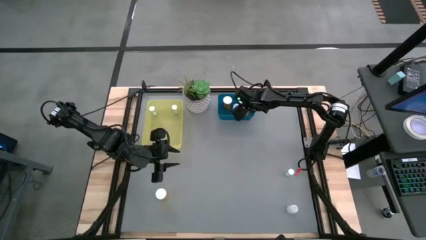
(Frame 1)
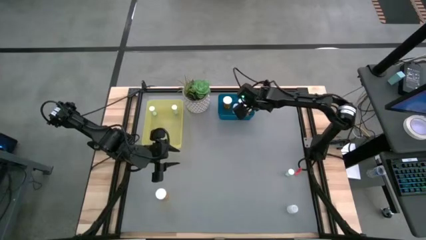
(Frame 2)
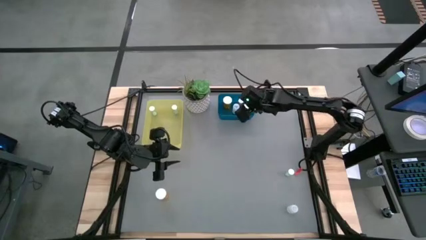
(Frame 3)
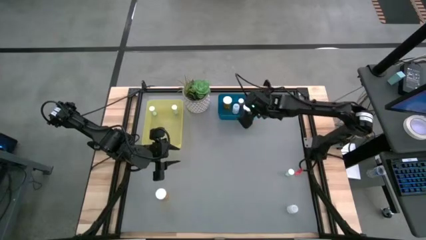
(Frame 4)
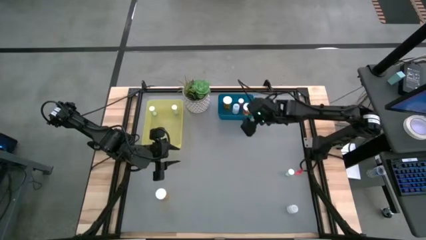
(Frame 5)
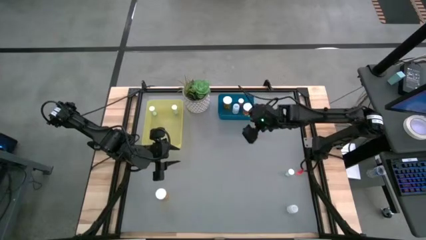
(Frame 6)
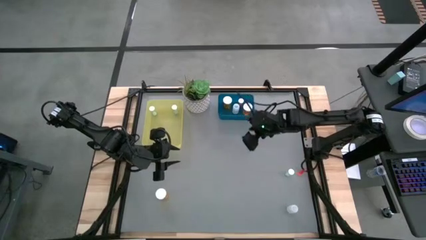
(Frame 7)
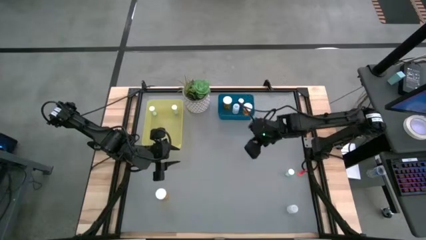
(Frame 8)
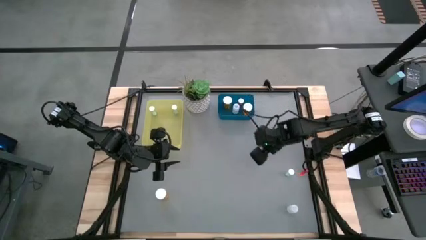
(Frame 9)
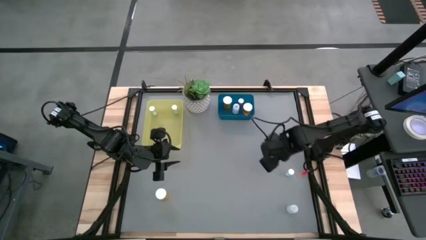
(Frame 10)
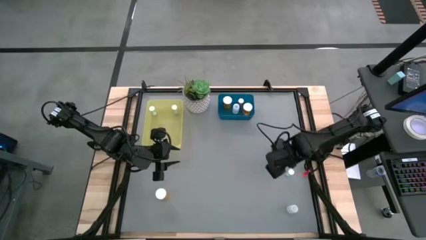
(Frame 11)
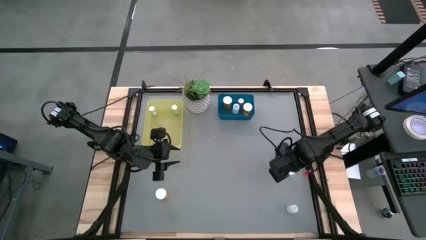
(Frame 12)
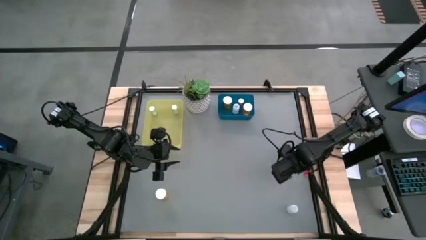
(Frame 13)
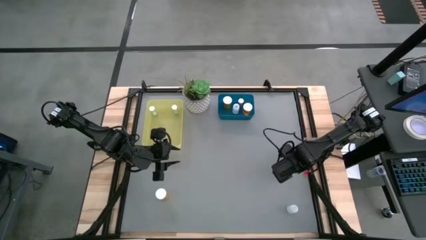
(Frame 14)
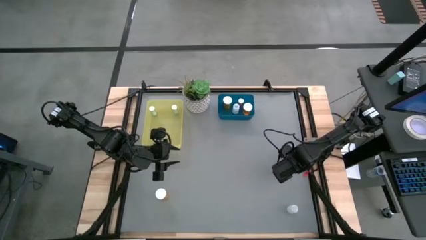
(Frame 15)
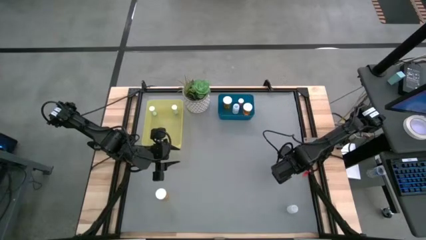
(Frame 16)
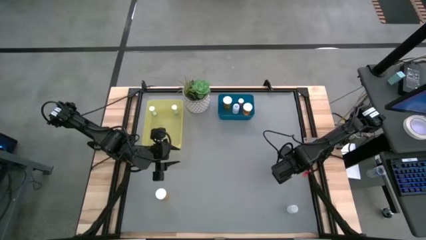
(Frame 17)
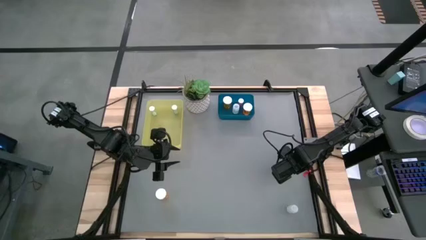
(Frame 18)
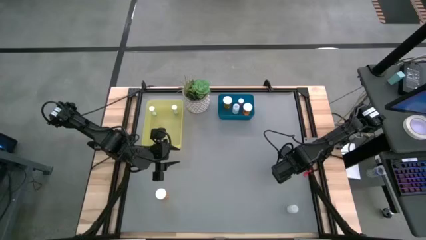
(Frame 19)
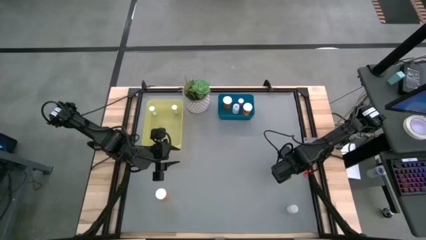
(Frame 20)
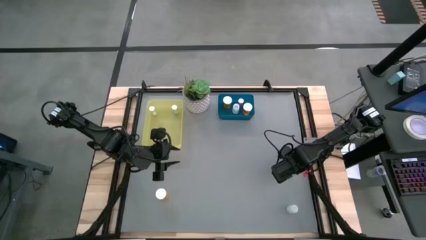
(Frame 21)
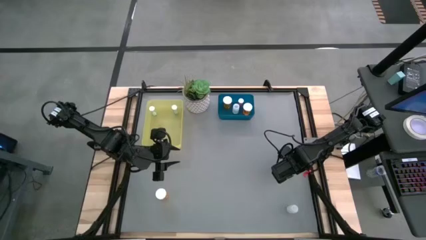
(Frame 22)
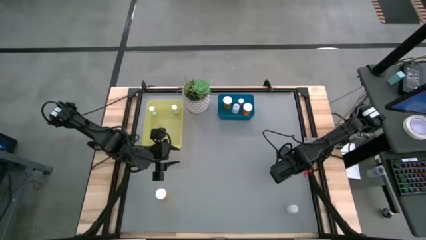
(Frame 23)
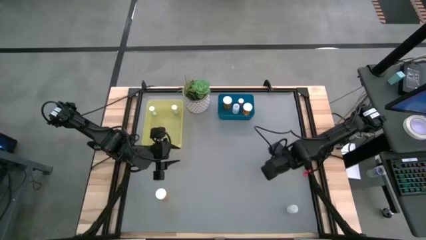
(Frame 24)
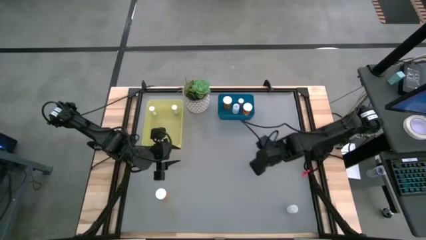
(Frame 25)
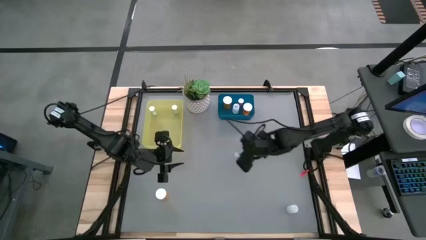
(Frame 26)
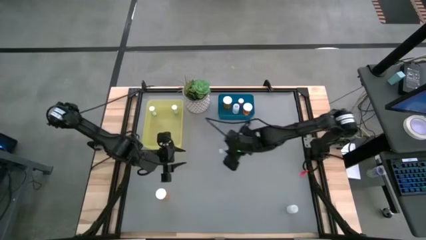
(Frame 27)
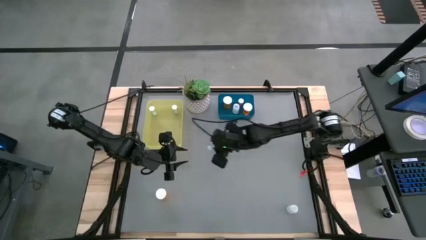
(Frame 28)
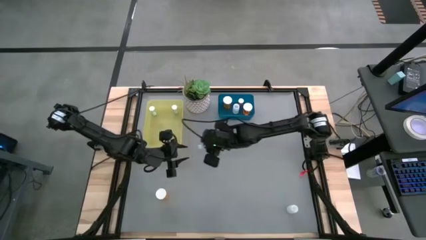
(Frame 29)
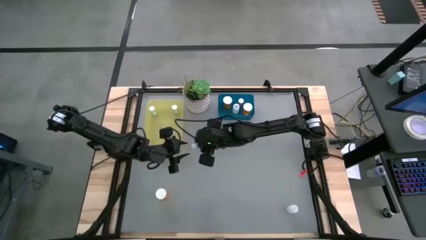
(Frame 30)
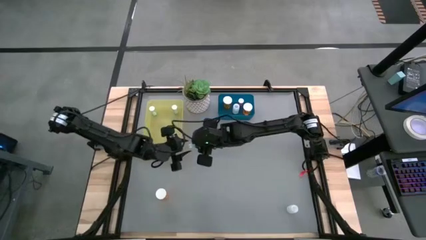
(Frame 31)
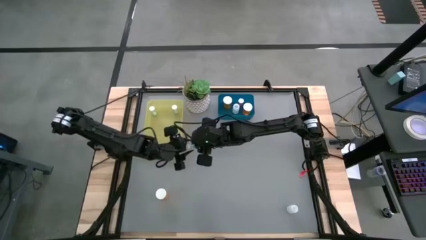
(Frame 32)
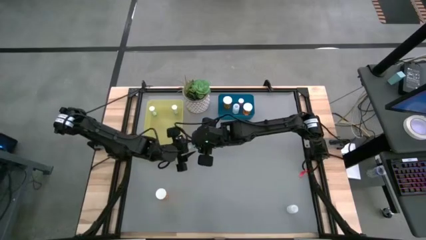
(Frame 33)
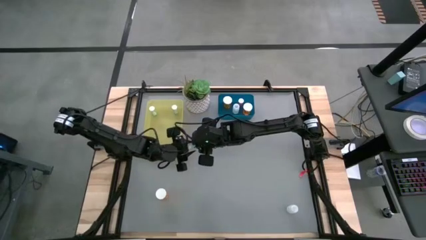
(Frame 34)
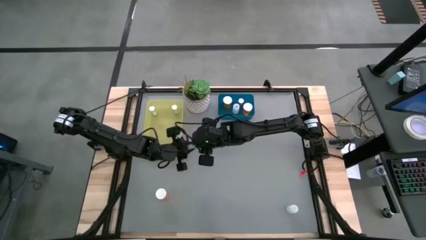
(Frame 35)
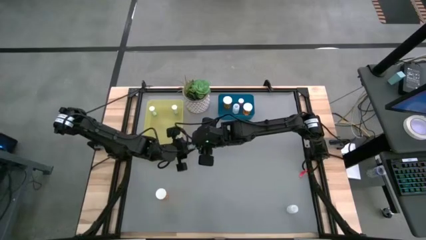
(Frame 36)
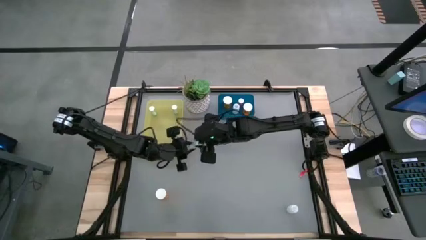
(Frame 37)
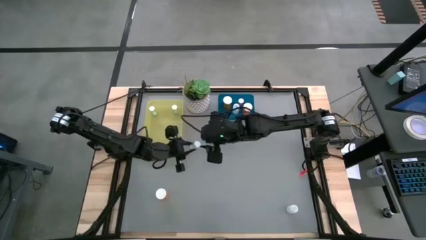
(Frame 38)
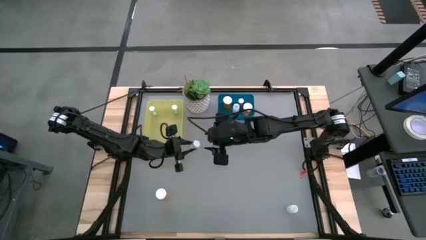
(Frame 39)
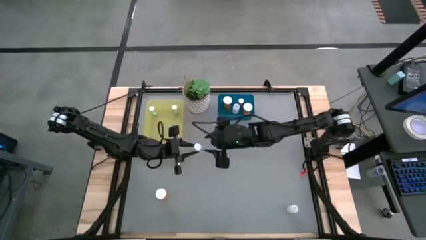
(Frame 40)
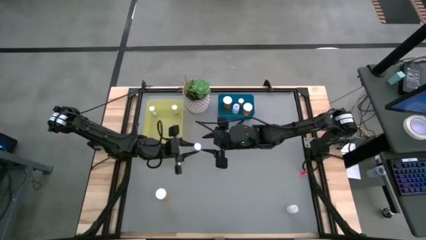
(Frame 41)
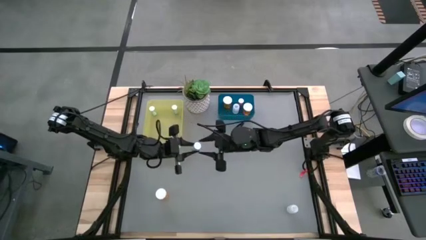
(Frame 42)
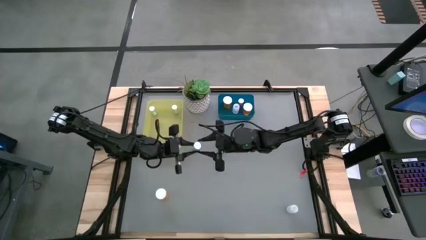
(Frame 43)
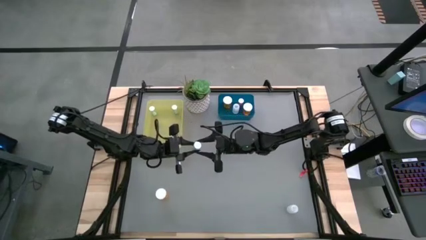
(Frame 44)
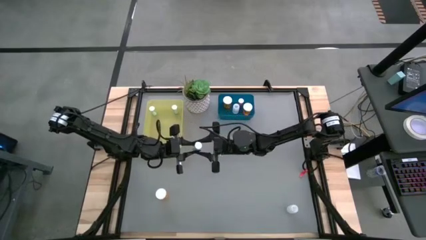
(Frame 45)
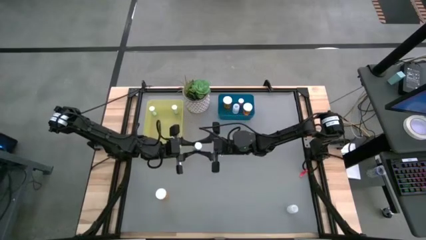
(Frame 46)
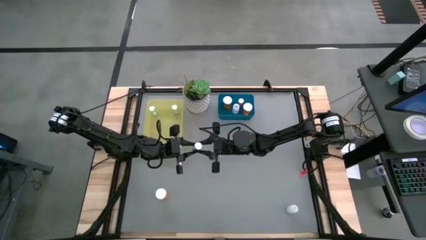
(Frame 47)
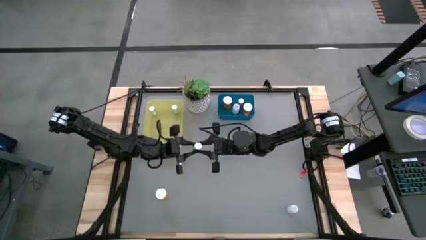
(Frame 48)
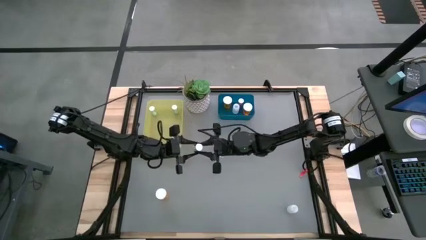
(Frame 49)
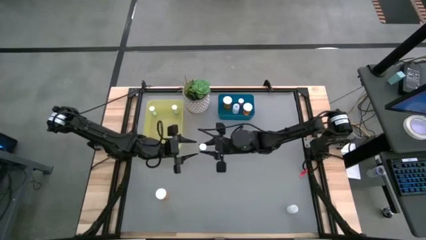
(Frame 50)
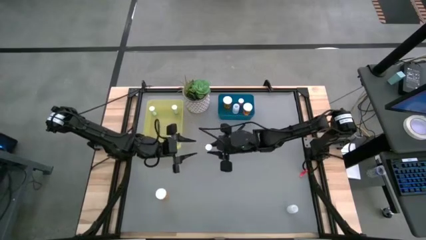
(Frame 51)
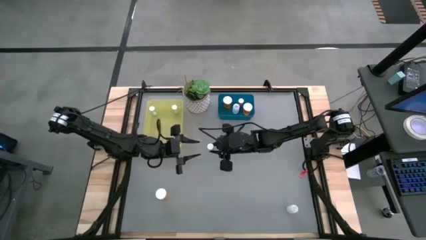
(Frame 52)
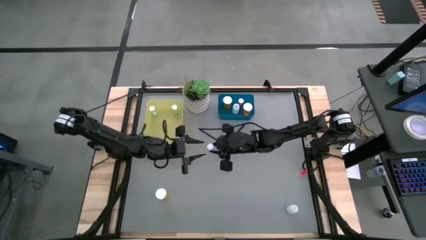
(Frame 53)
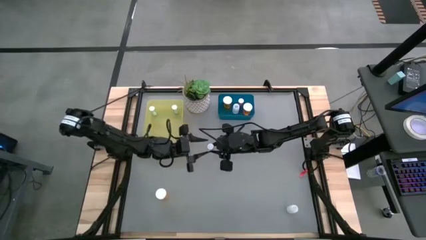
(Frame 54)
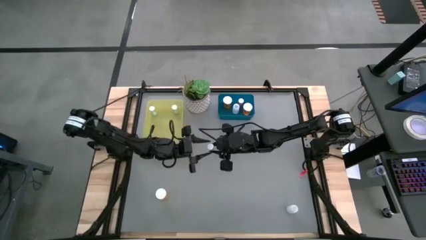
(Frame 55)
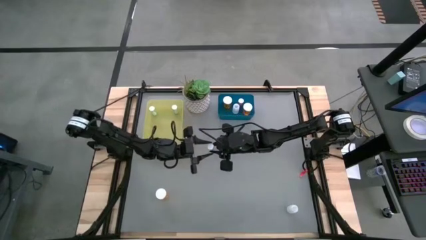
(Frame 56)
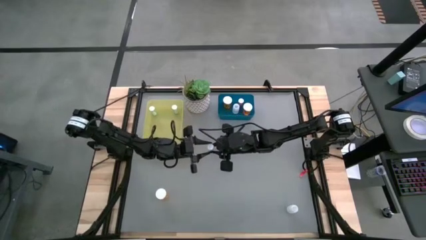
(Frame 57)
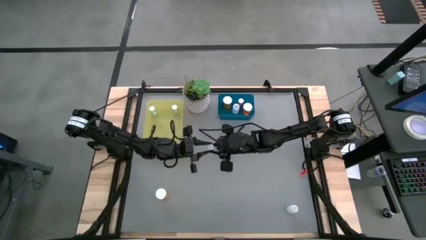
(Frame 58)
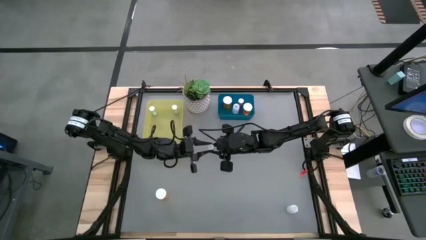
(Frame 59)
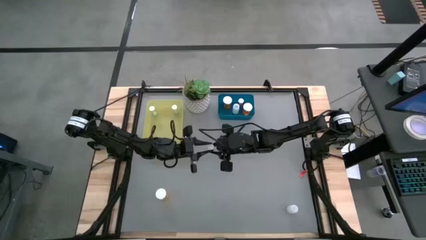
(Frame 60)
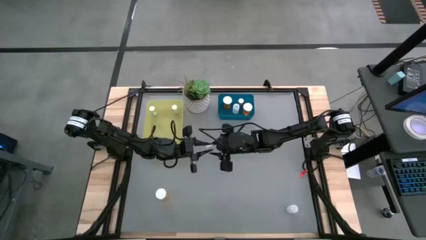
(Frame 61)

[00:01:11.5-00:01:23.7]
Task: Pick and place medicine bottles into bin by pill shape (circle, oval)
Put the blue tablet bottle into the yellow bin

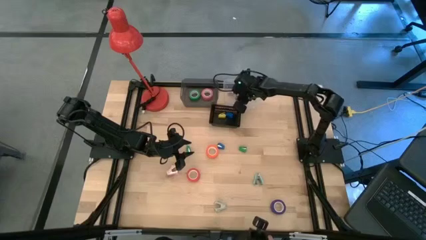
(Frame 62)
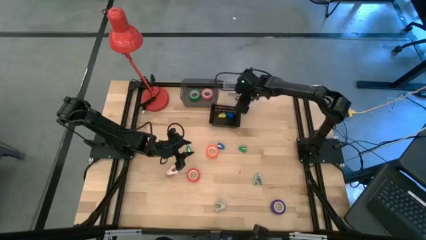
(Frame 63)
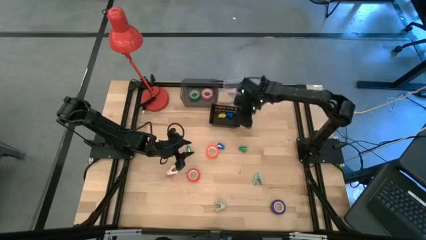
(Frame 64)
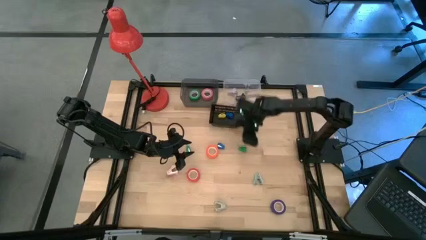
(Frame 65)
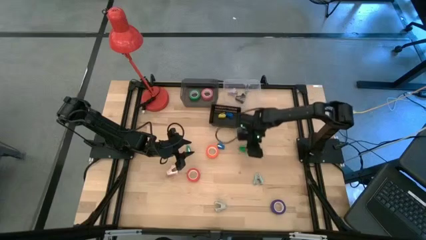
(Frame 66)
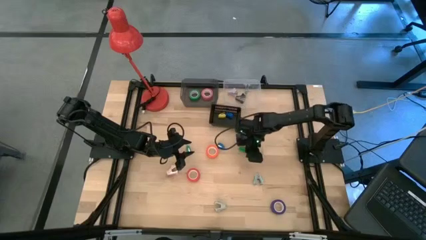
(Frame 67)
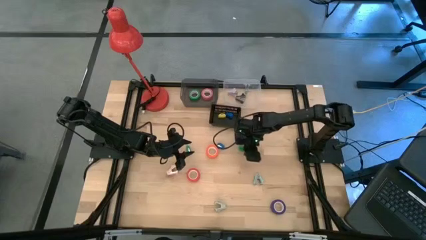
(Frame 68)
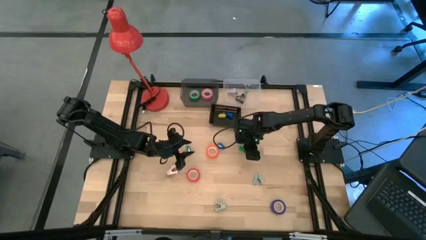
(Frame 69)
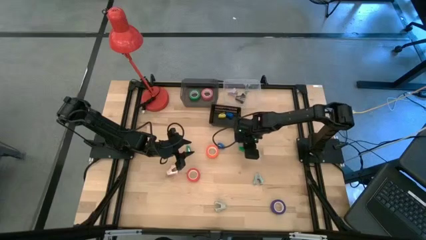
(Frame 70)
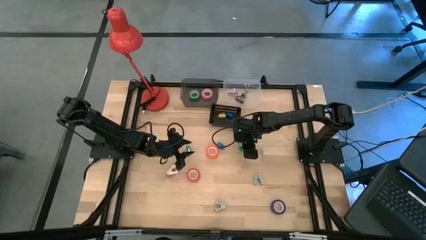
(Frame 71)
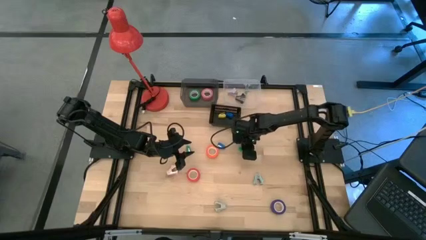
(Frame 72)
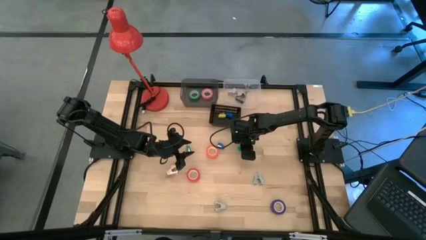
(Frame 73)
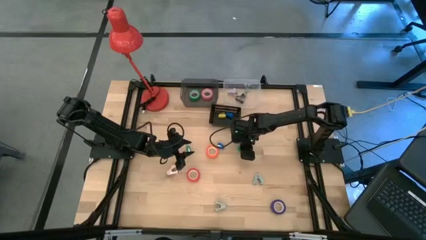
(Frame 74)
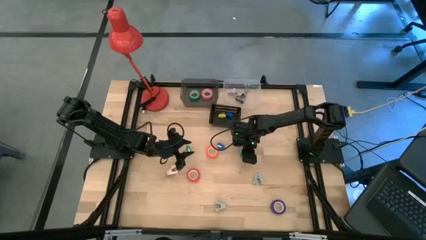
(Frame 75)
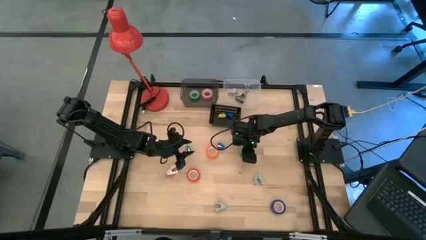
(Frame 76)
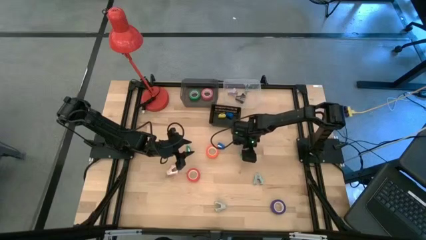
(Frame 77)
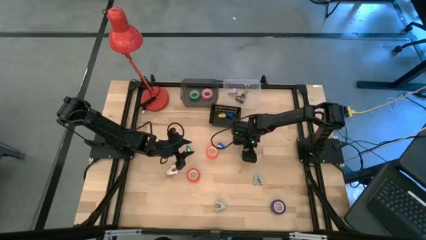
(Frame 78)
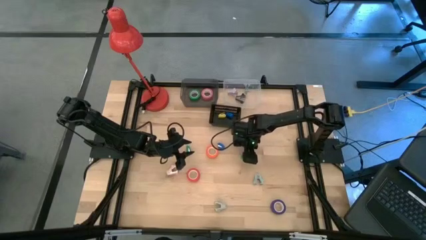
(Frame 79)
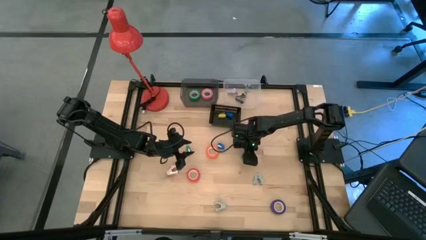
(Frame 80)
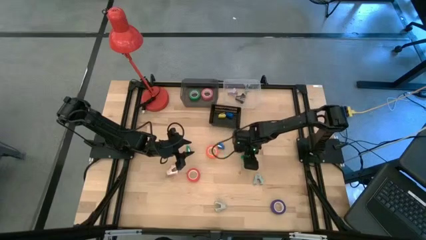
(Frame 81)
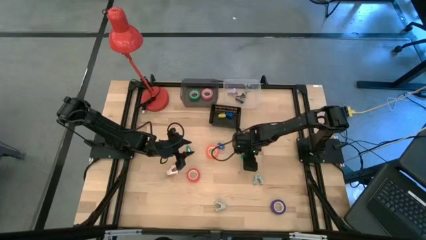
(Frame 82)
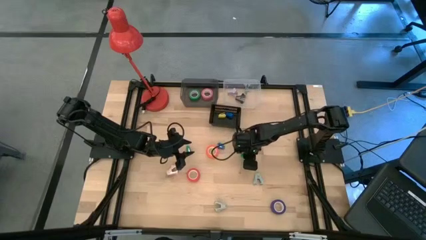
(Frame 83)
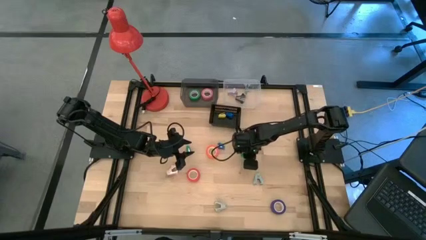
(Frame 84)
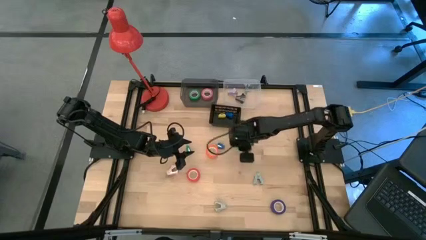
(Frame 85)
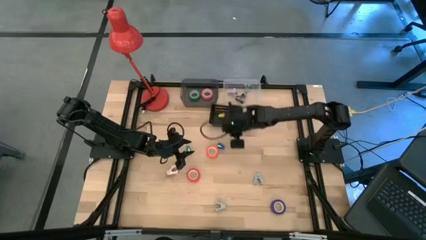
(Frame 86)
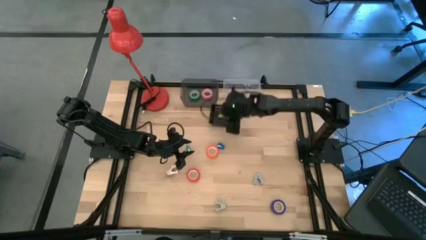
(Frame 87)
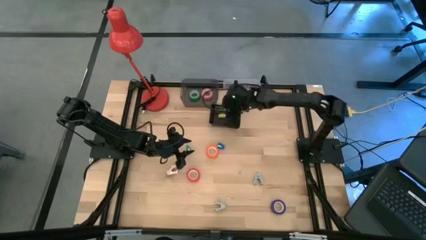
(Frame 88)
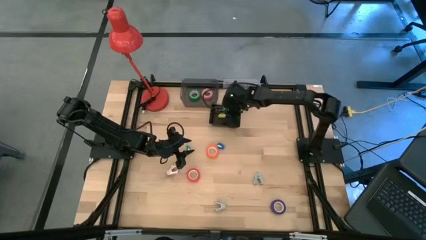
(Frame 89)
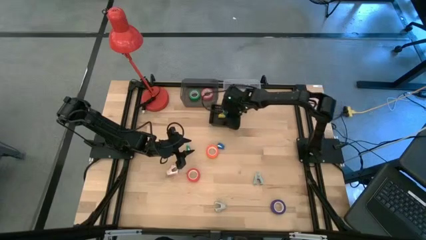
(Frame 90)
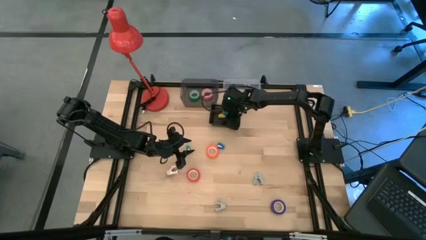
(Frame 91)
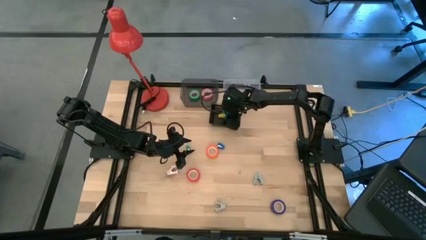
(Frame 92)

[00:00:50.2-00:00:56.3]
Task: Pick and place Stapler, Stapler remover, tape
Put the right green mini-stapler into the black bin
